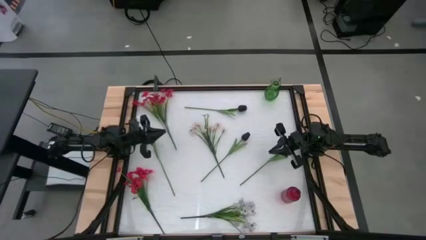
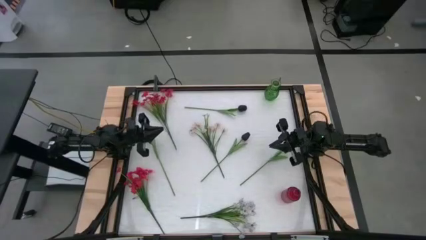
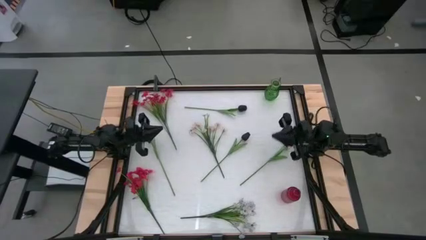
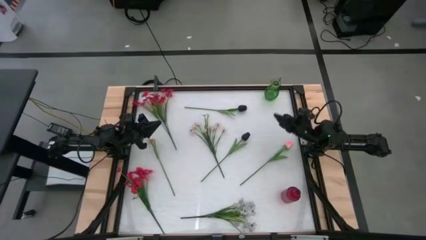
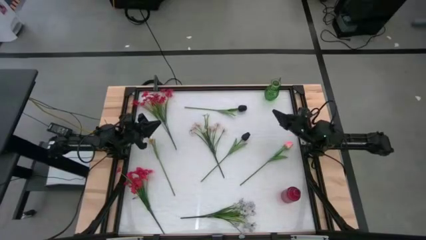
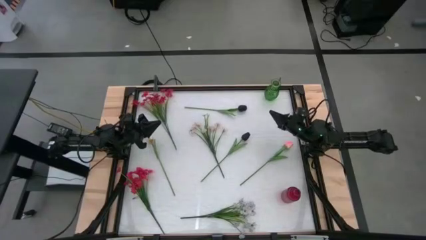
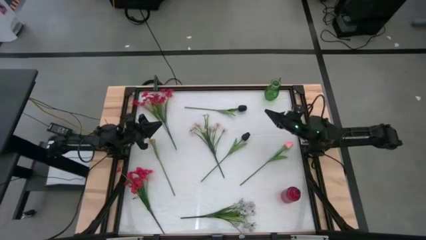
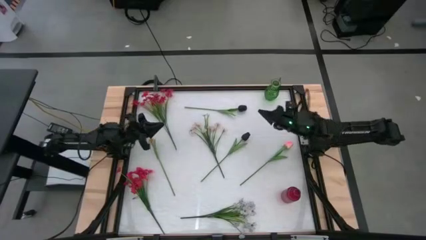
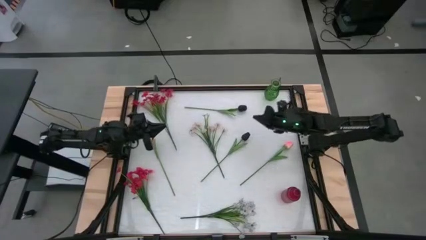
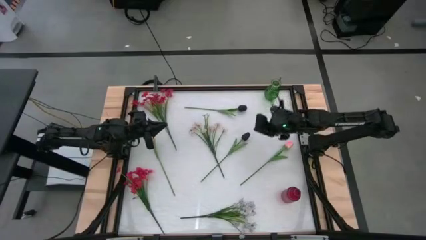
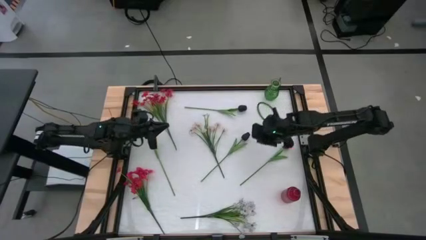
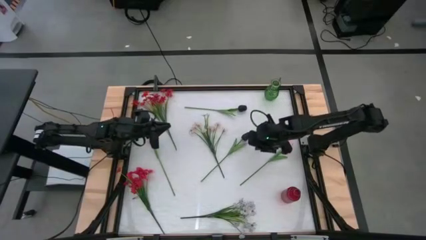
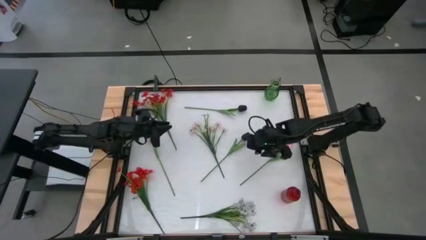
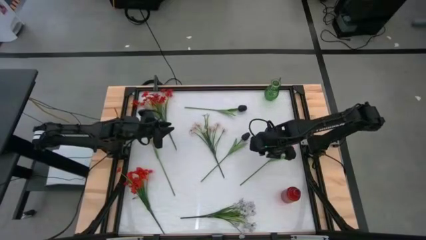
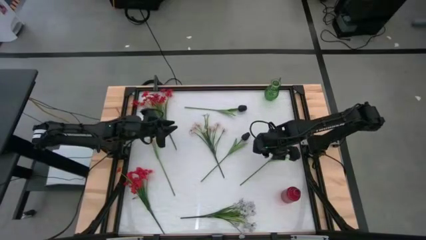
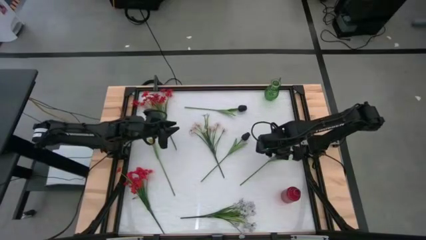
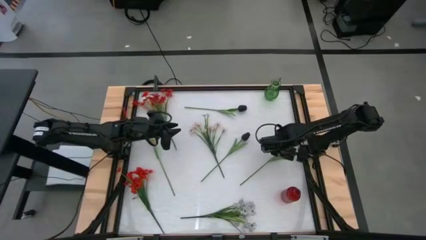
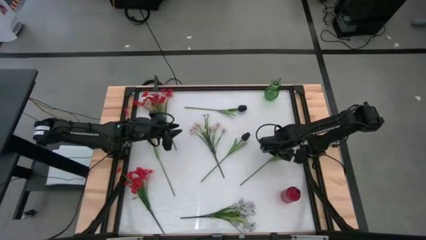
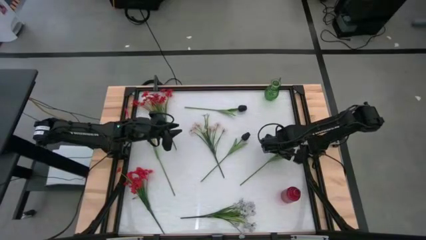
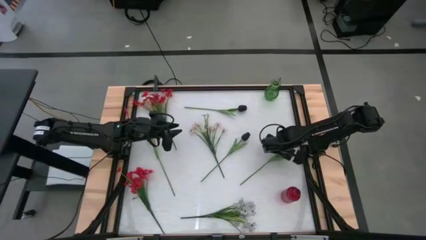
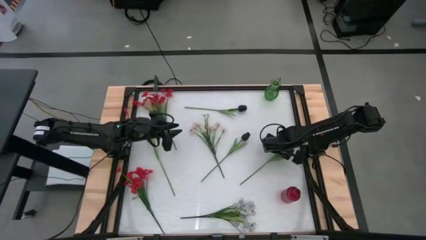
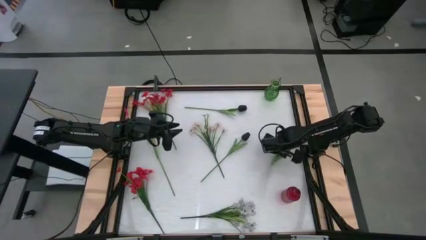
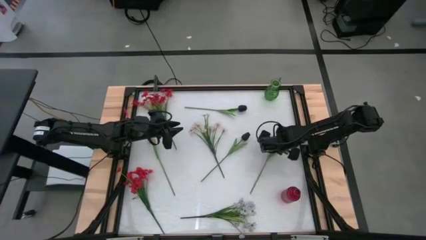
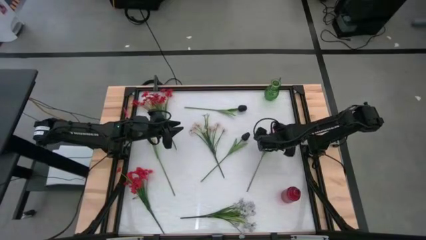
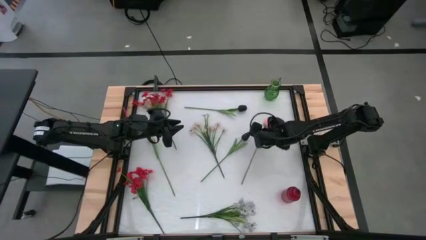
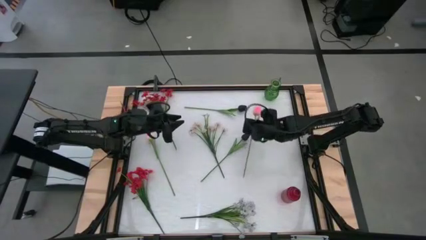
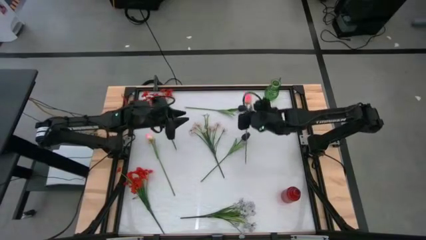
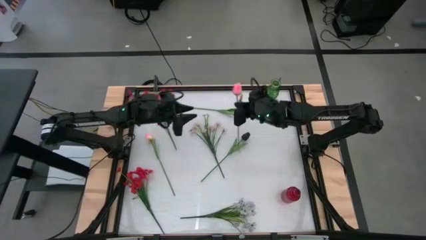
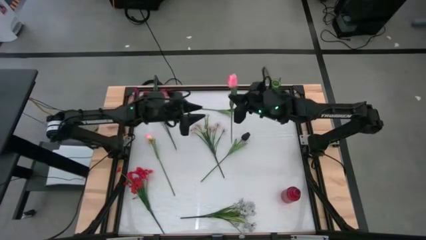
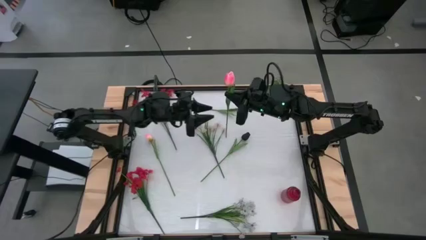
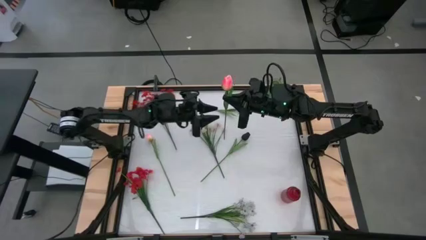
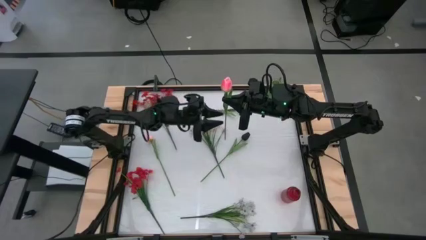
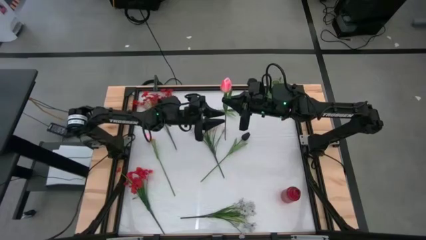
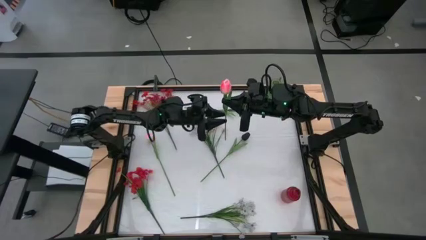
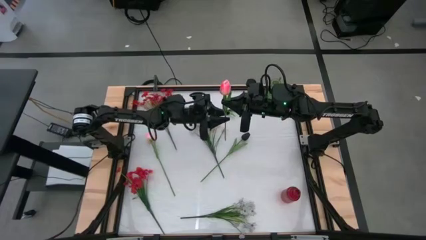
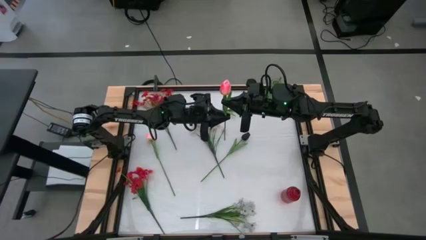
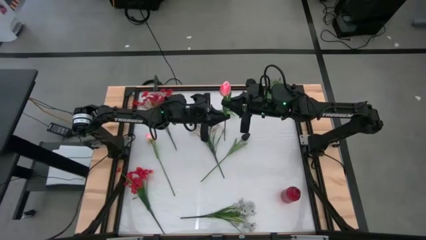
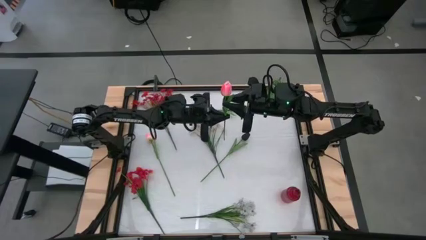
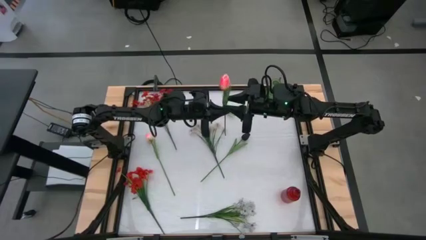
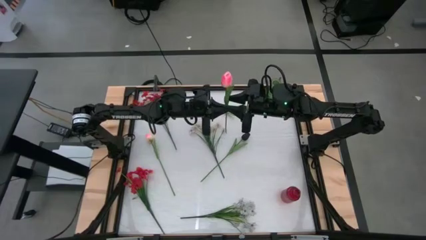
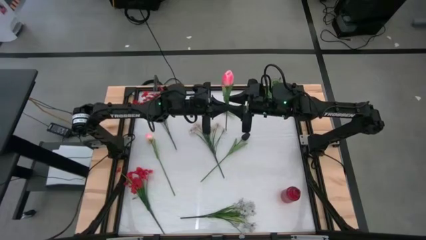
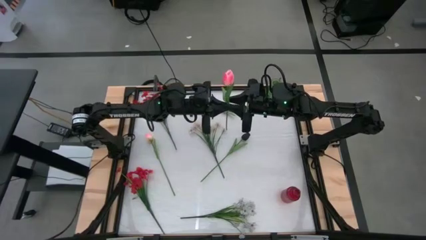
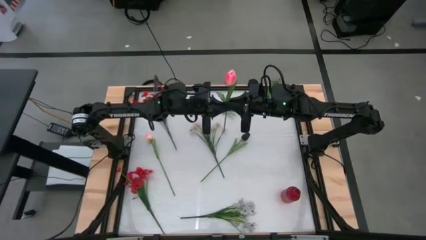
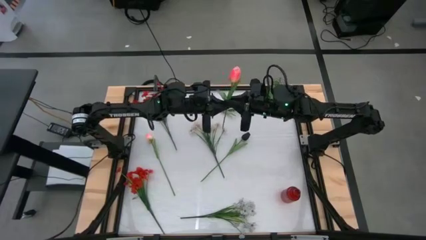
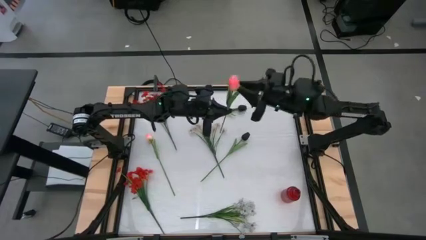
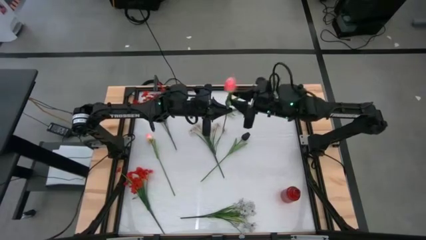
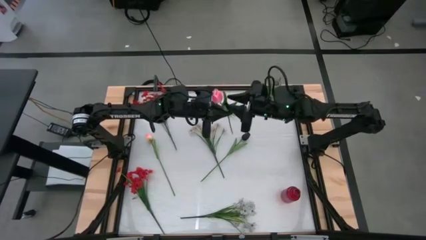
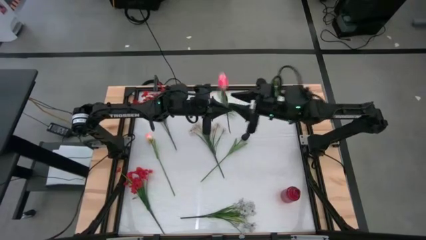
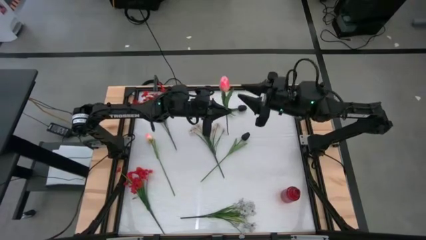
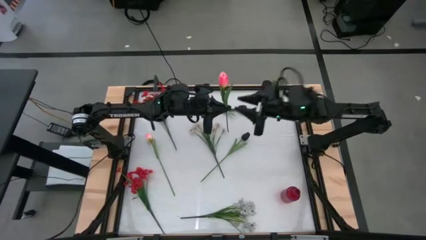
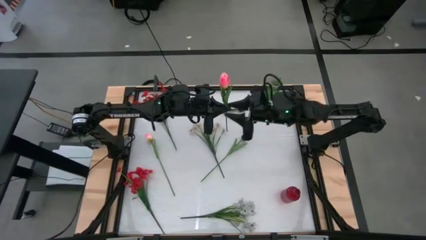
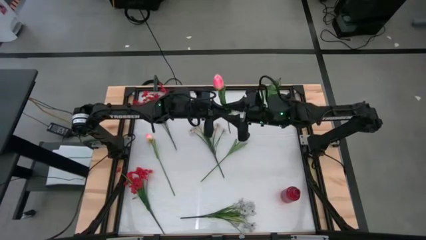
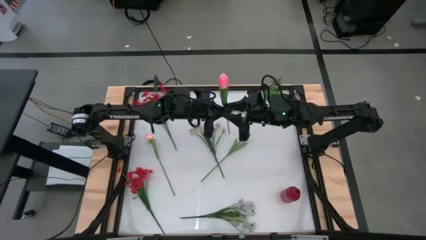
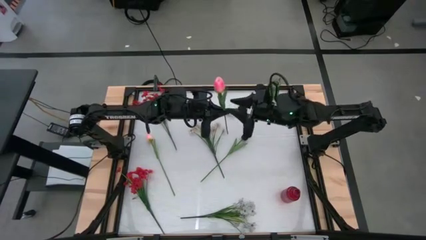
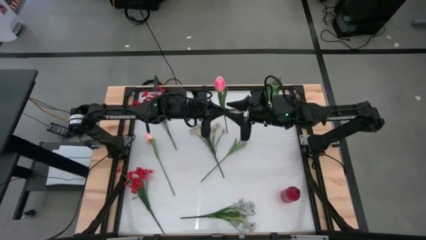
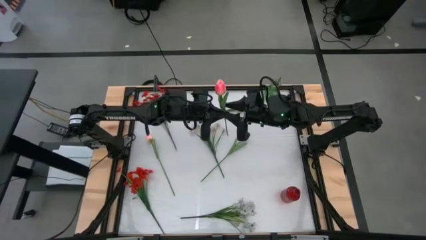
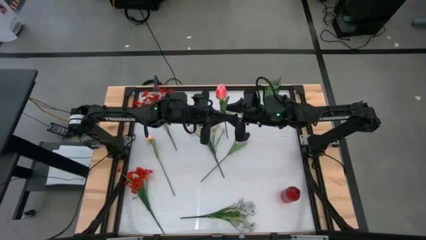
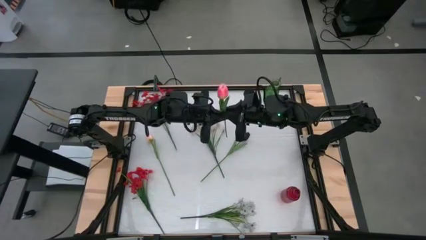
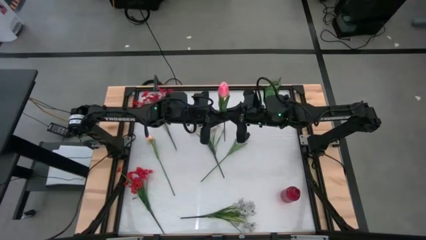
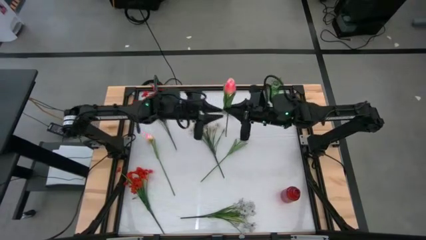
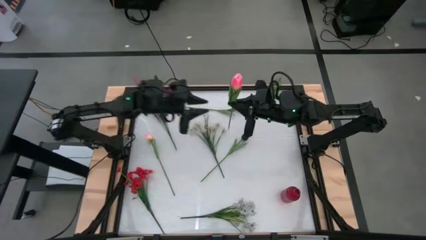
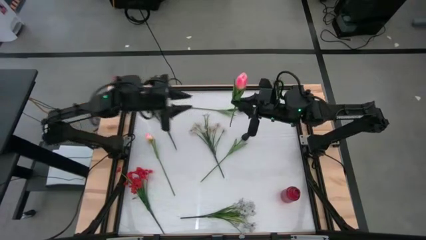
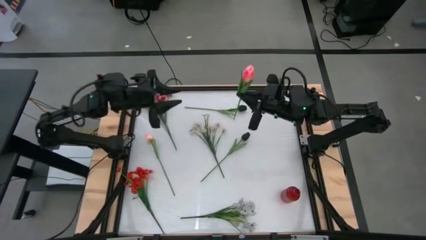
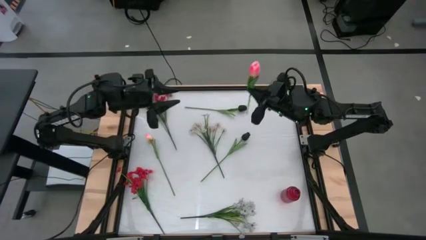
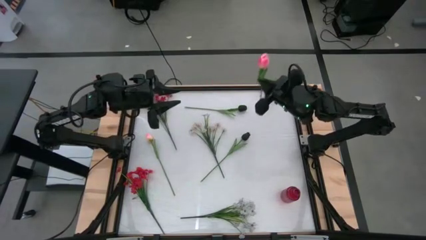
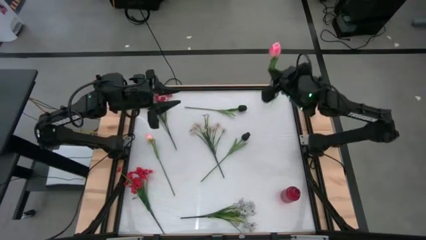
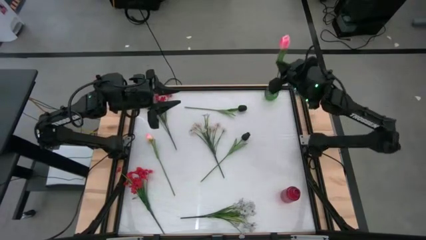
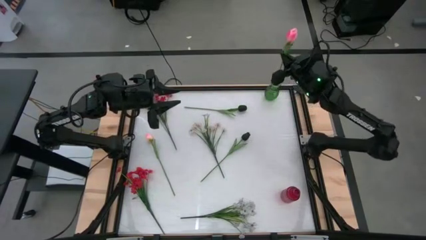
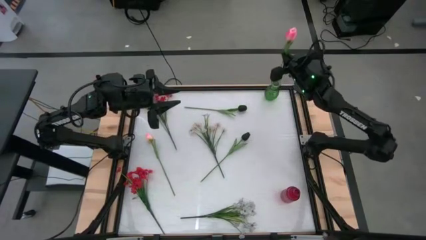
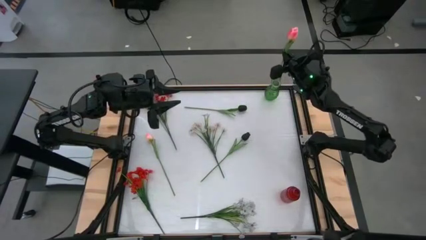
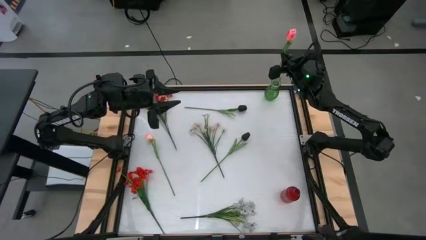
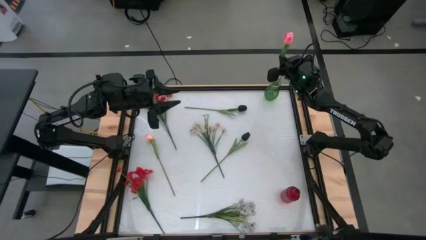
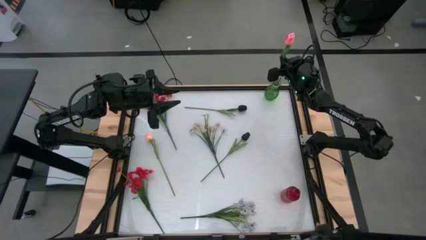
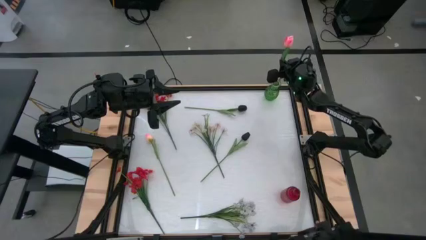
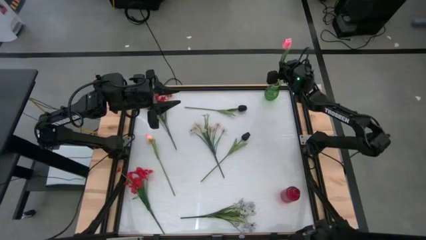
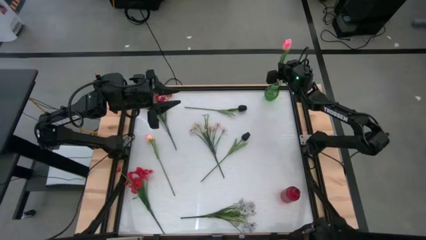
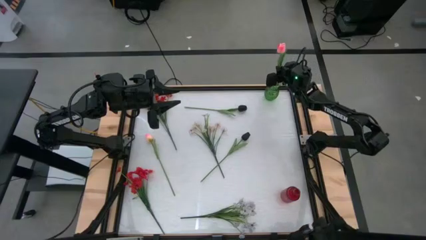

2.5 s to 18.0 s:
Task: Sort flowers into vase by color
Put the right pink flower into the green vase
